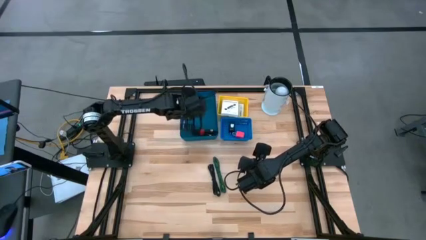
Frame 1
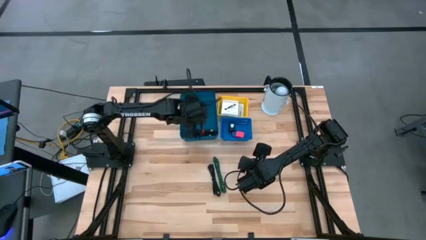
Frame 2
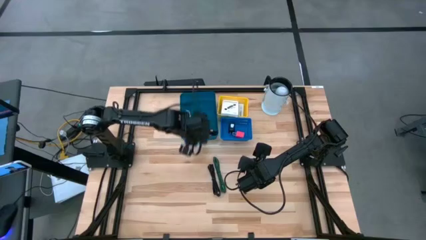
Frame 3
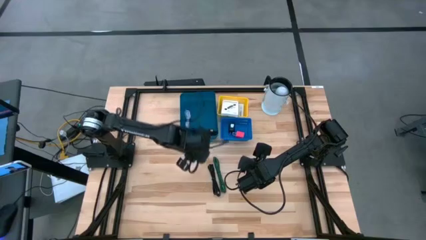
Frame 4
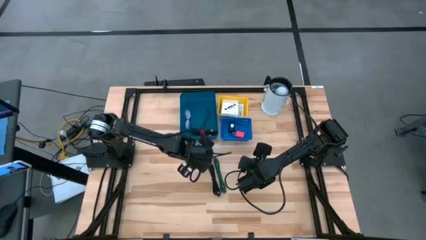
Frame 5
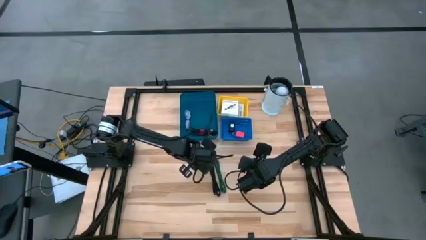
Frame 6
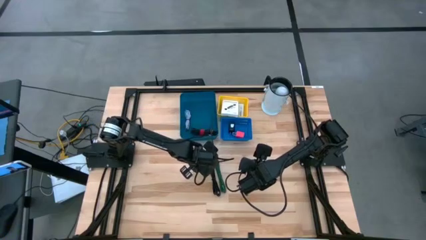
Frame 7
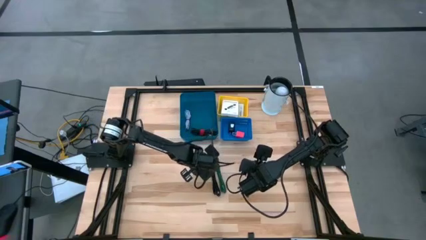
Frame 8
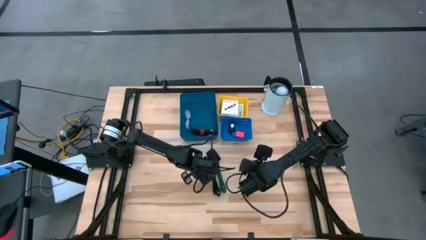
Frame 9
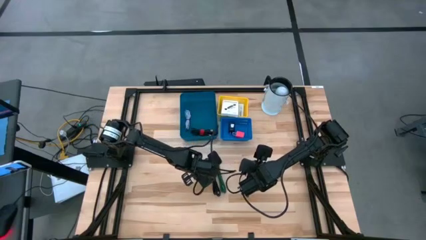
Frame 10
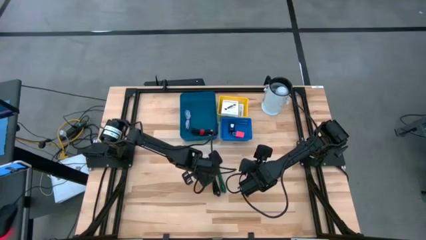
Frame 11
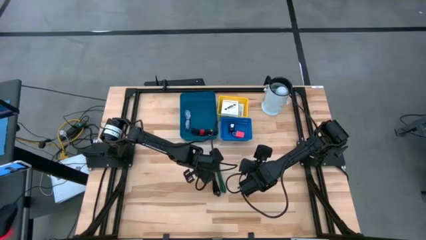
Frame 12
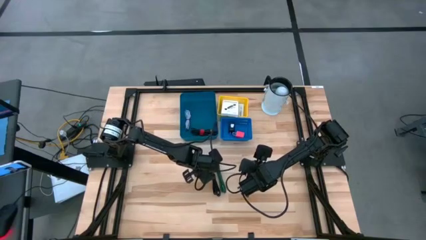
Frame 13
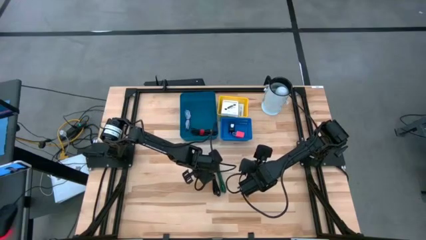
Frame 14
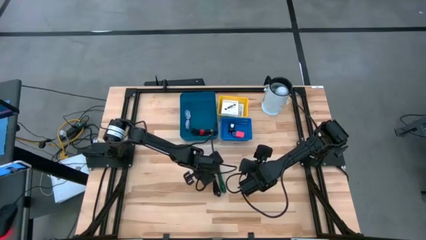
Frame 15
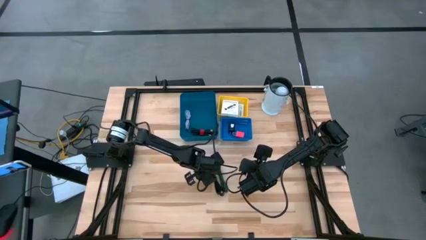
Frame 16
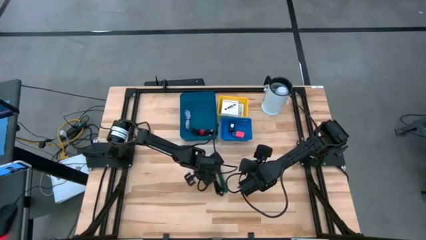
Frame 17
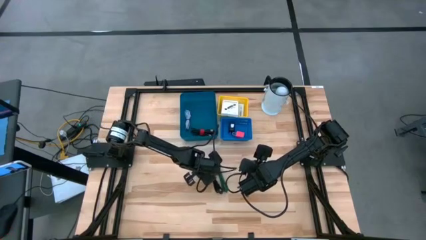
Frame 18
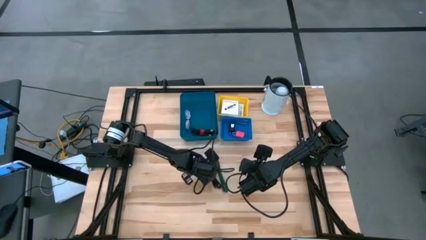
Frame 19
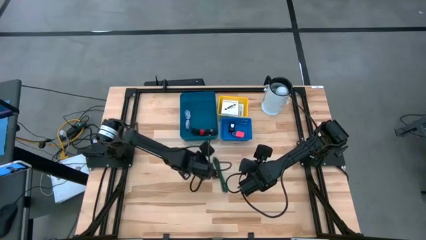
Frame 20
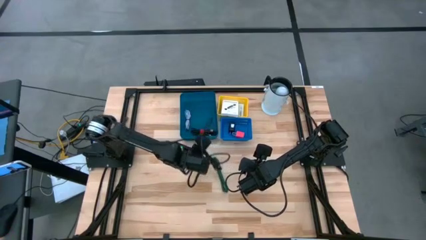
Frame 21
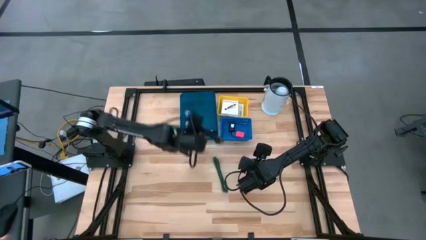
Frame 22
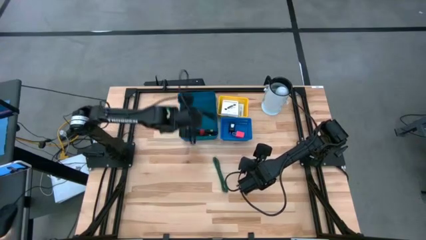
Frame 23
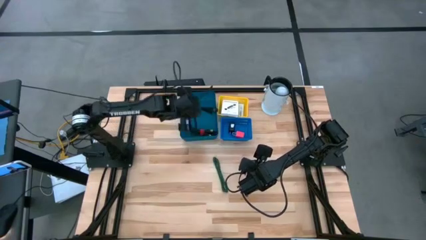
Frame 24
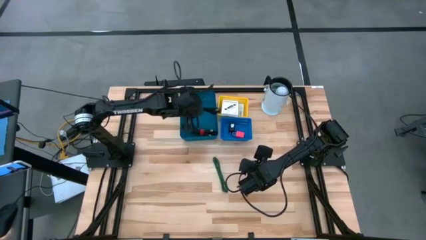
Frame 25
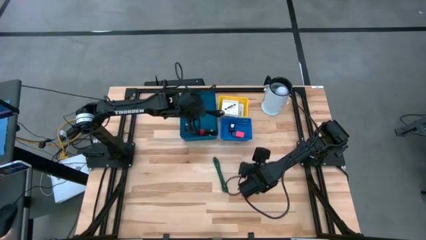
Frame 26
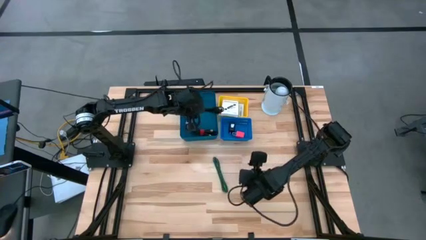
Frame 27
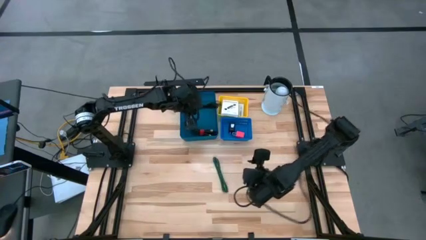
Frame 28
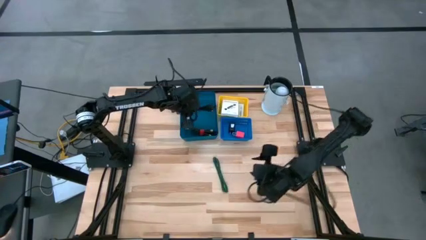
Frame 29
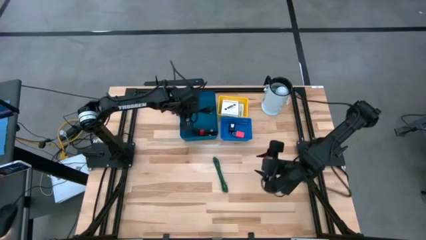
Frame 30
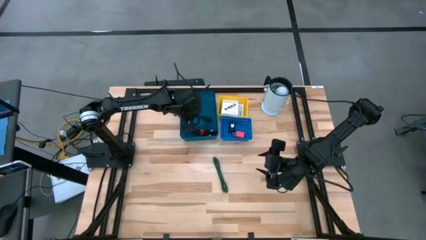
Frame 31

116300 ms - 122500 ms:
Task: Pick and place items into bin
Put the black charger cable into the big dark blue bin

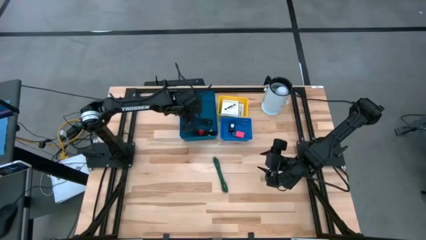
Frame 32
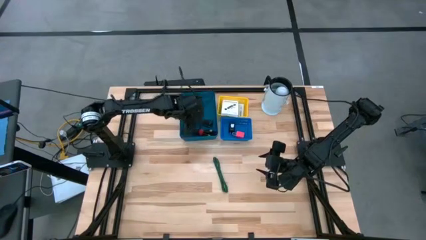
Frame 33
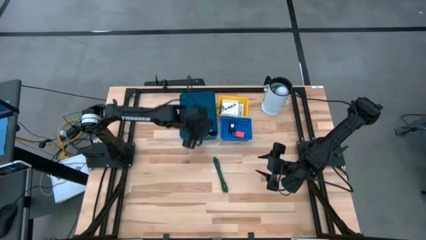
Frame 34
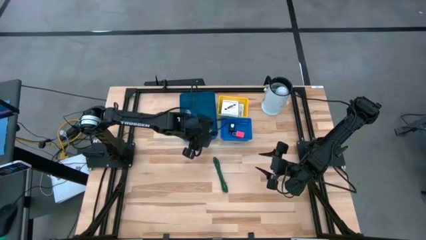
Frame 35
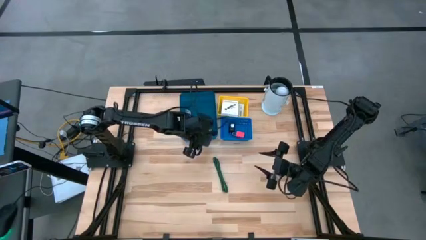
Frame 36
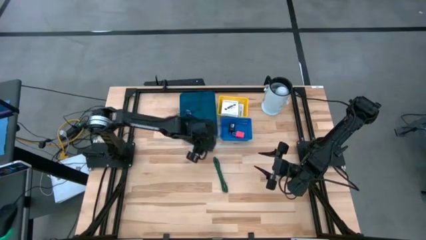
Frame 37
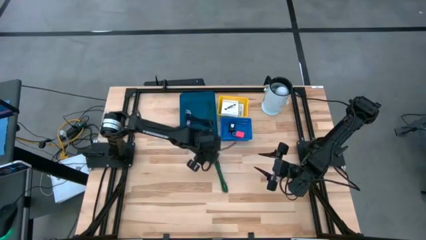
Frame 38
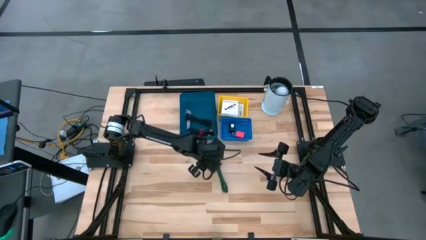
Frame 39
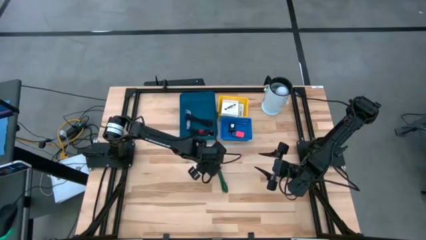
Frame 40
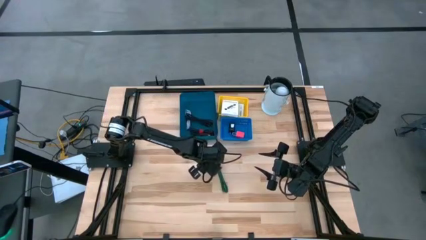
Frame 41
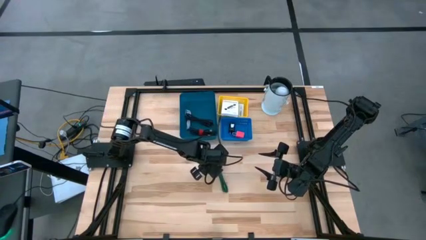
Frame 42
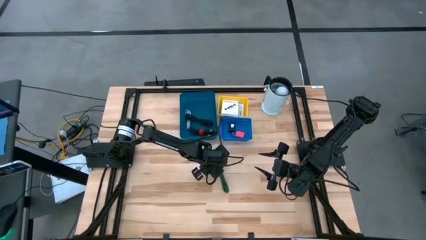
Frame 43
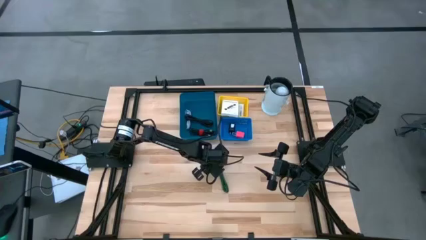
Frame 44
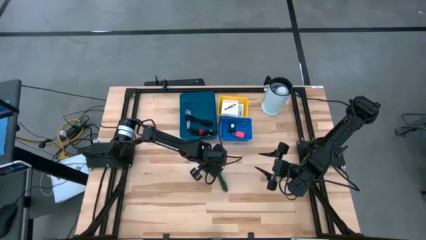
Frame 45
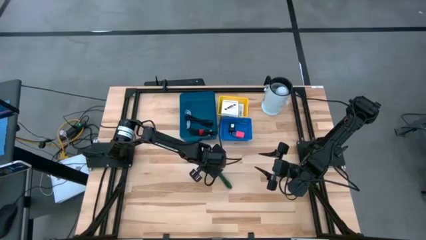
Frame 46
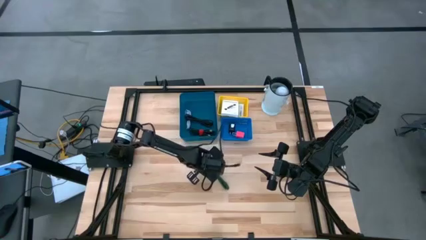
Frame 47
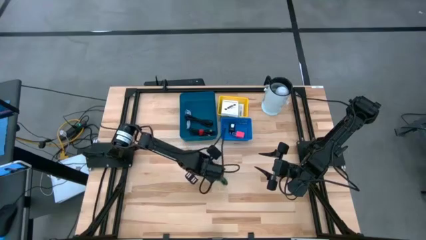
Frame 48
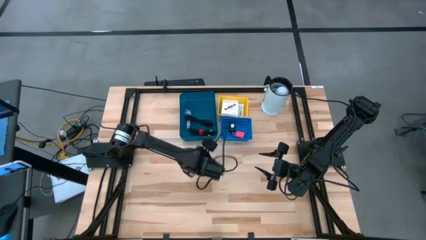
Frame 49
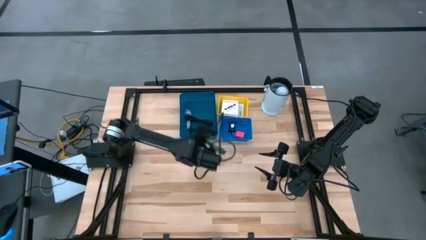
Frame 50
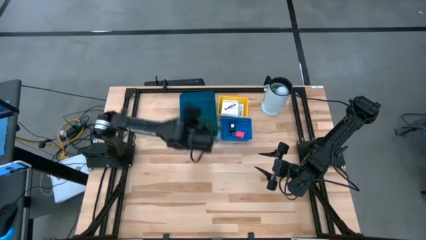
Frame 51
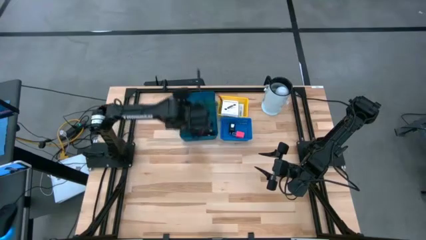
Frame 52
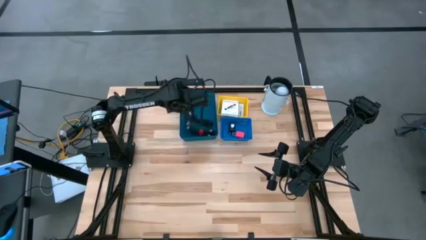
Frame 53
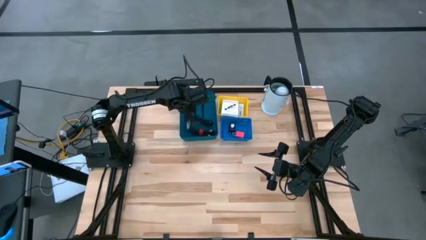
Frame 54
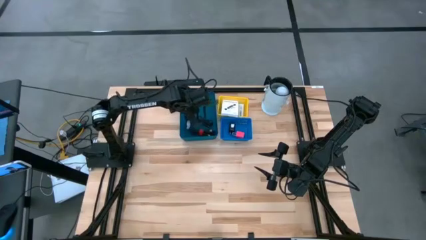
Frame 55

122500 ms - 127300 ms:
Put the green charger cable into the big dark blue bin

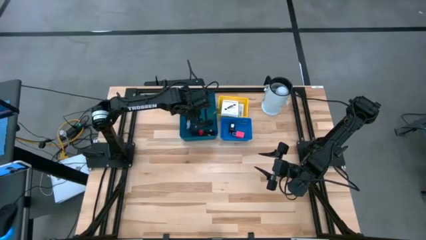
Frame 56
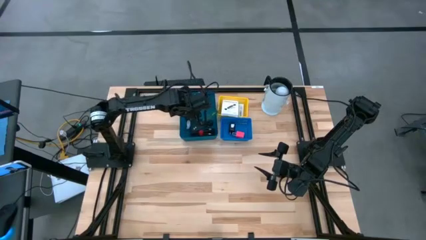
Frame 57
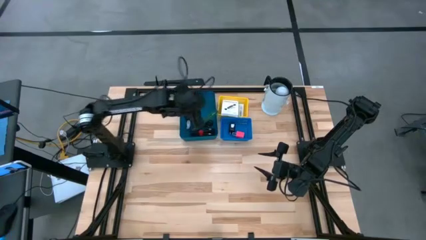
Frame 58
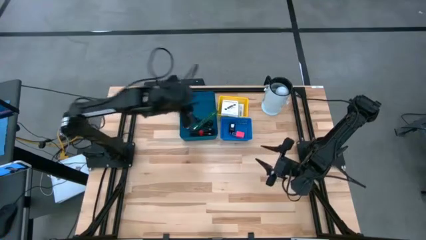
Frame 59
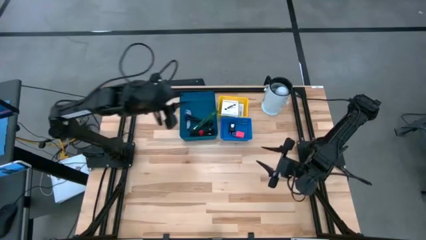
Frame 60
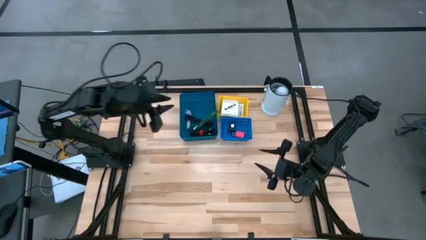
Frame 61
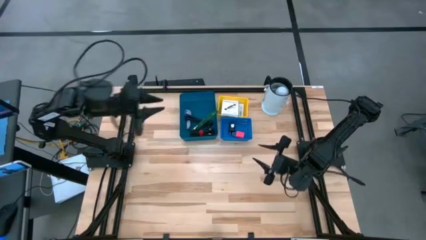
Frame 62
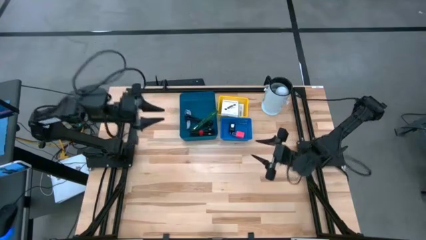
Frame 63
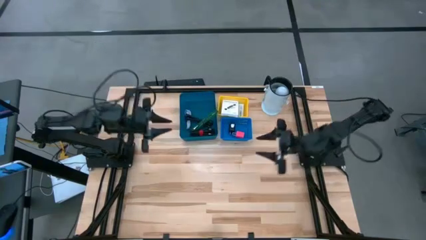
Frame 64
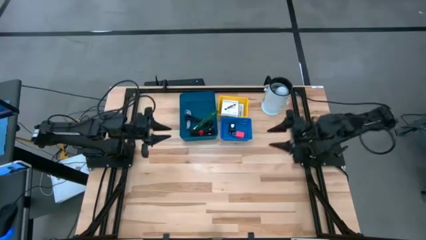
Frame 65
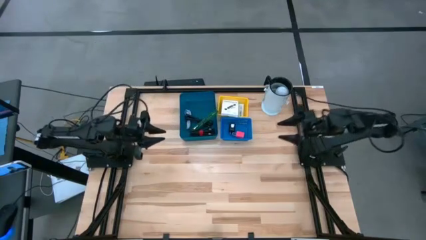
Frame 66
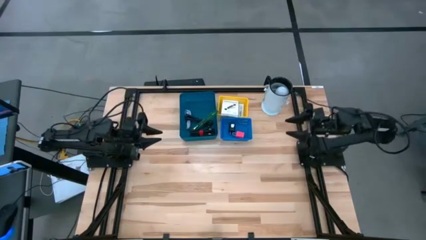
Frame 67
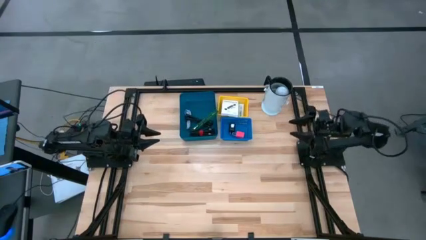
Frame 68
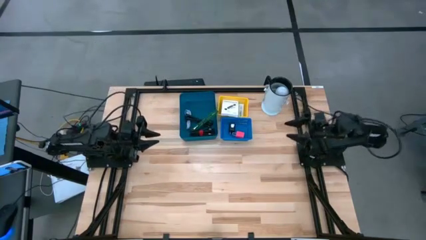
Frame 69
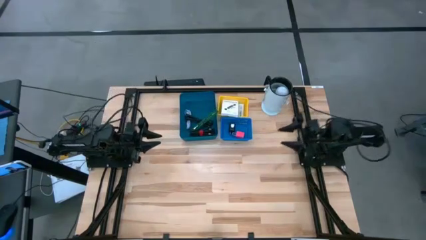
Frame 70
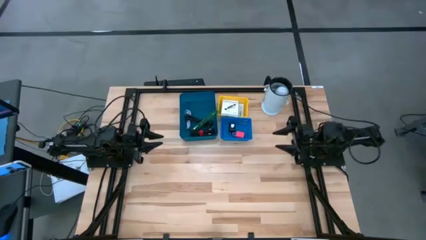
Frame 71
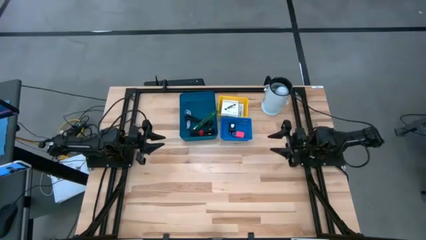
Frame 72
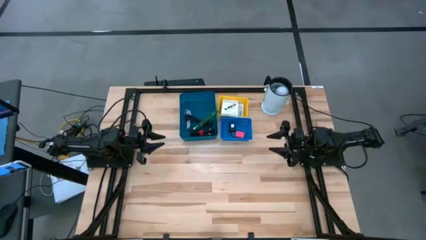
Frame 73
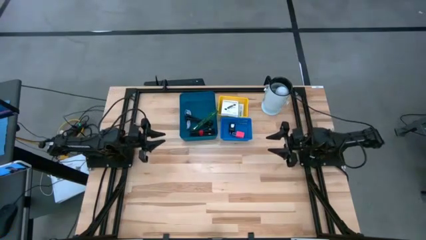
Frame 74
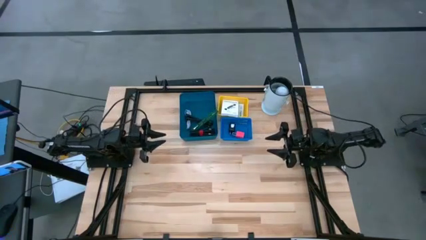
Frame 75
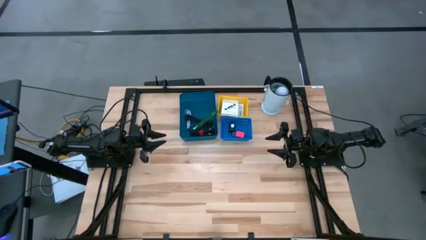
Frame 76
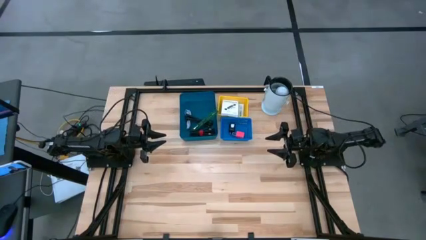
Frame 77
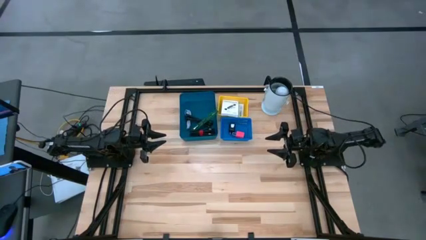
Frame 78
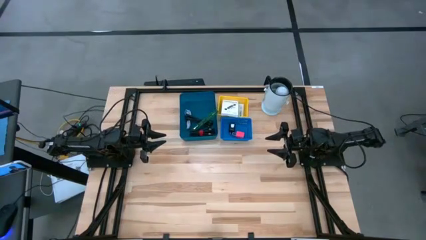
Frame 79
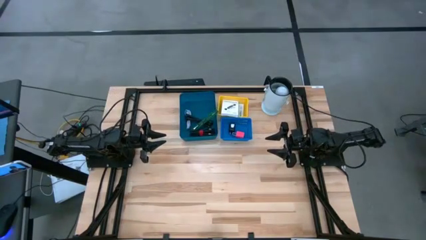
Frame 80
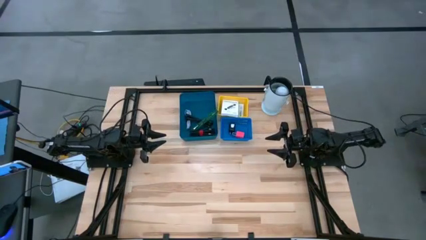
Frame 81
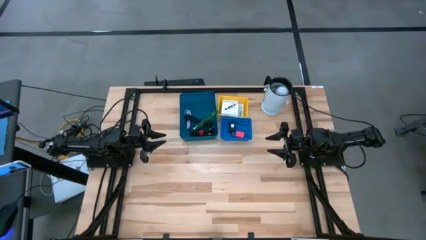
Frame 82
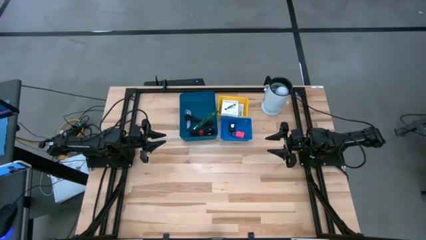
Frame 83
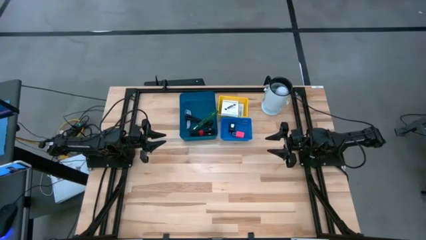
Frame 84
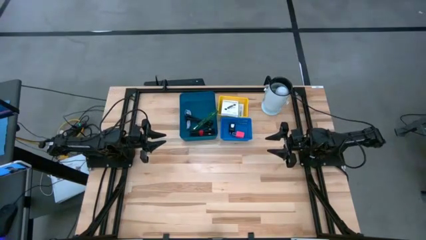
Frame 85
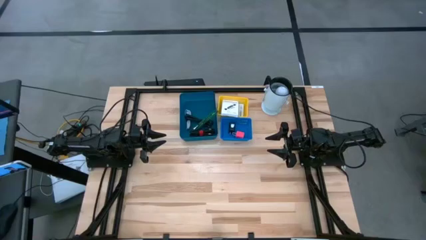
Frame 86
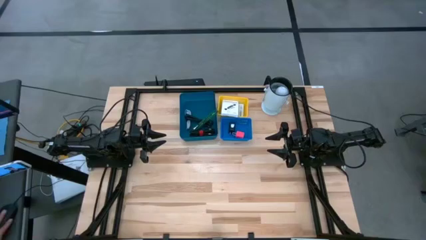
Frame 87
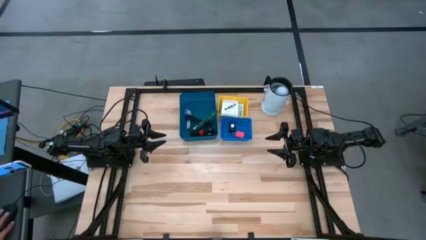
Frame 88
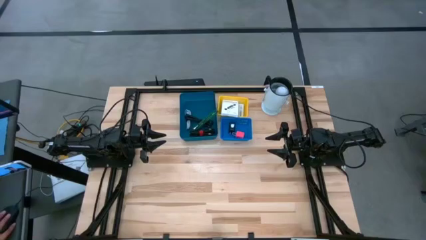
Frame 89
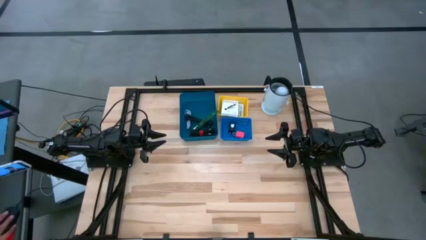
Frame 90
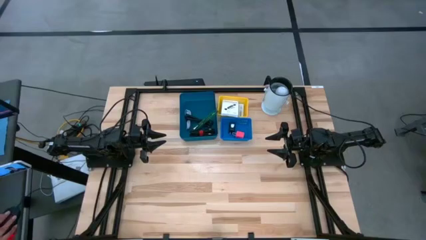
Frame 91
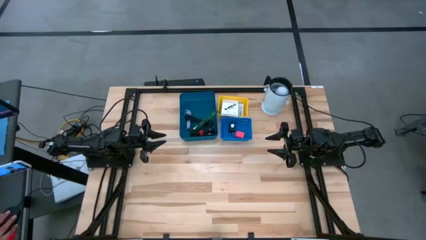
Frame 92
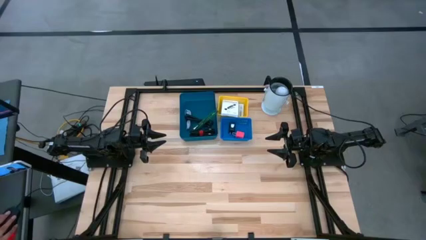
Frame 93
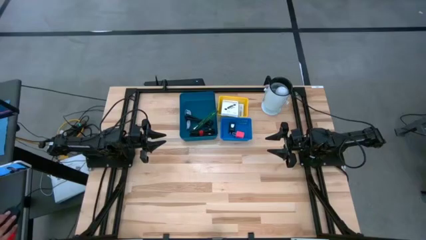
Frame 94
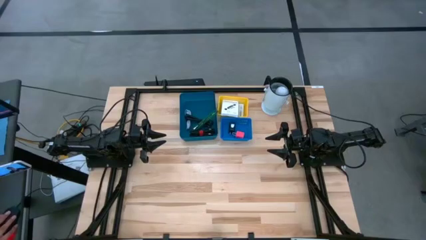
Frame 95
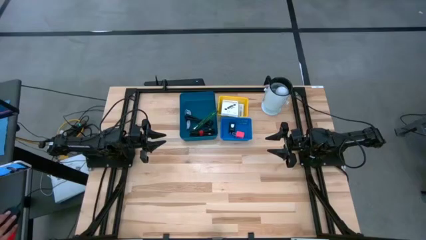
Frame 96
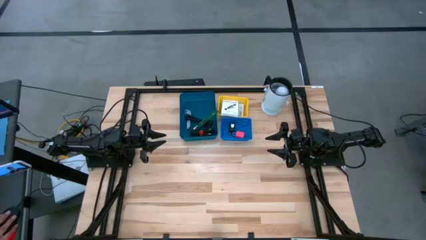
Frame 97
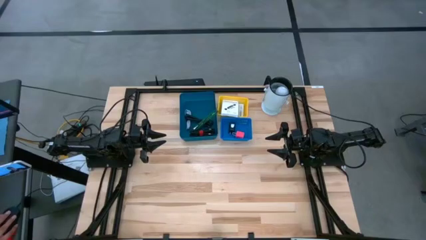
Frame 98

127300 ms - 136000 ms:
Return to Home Position
